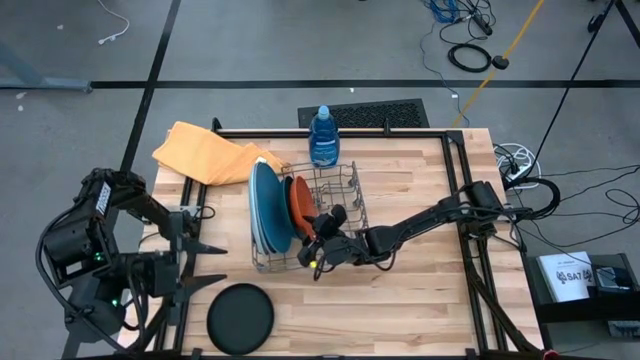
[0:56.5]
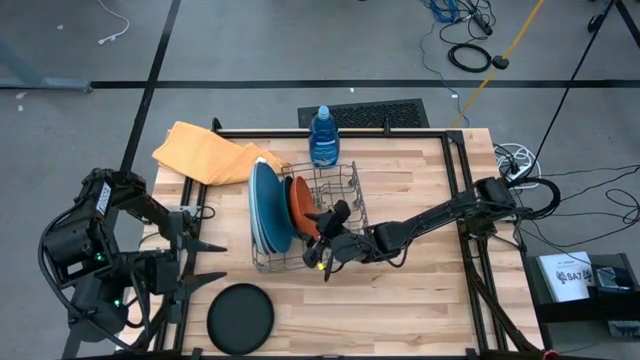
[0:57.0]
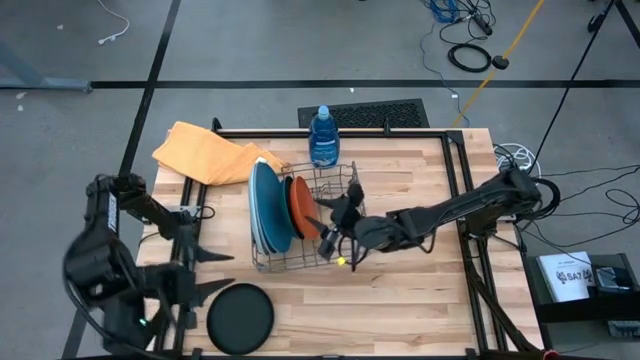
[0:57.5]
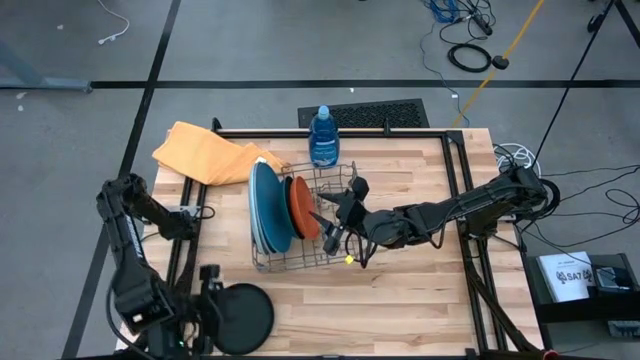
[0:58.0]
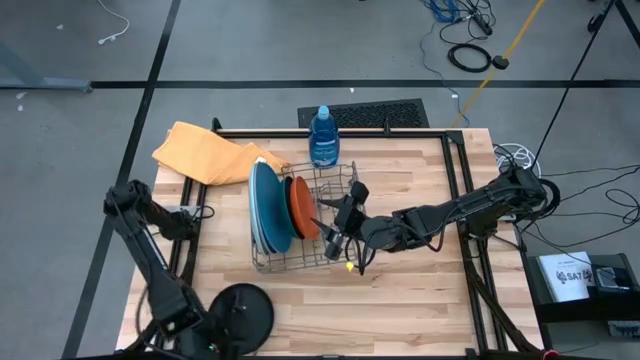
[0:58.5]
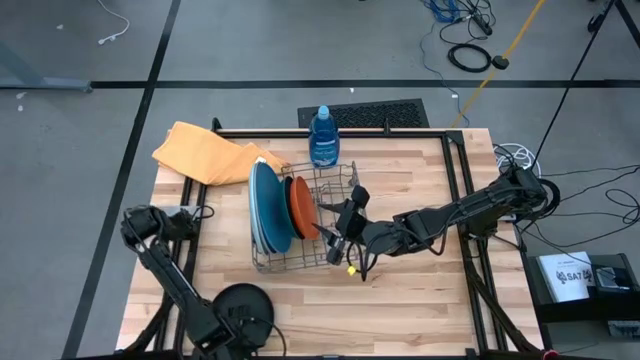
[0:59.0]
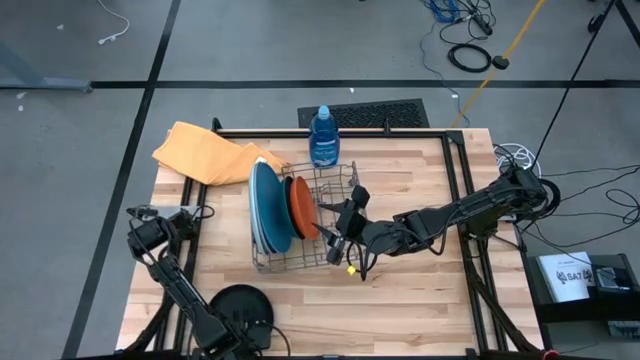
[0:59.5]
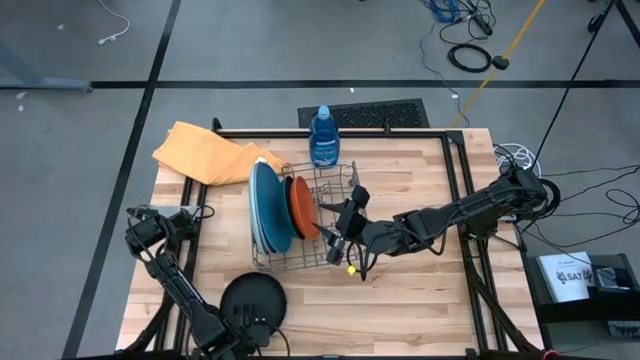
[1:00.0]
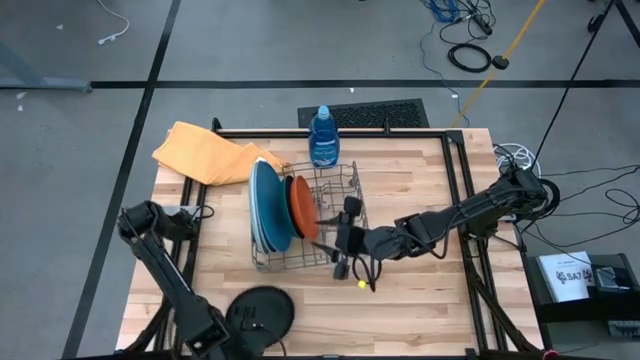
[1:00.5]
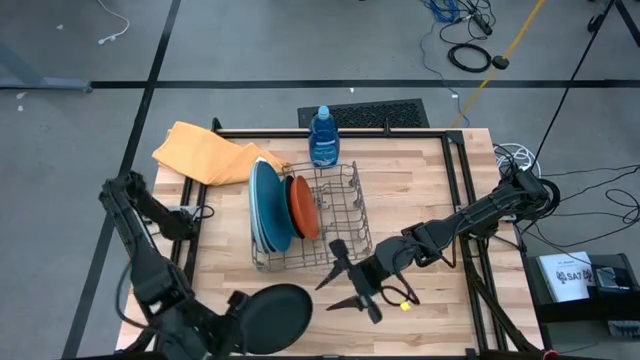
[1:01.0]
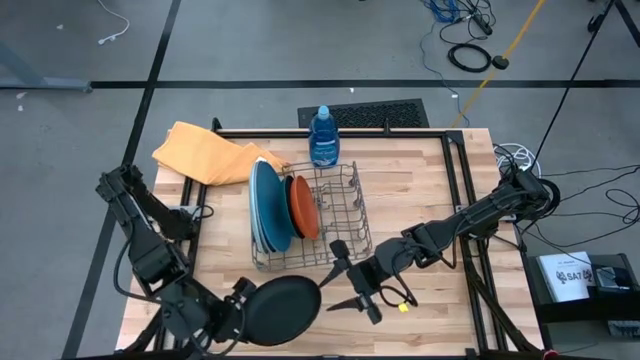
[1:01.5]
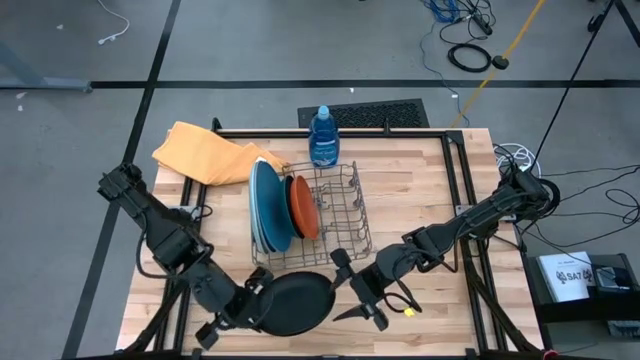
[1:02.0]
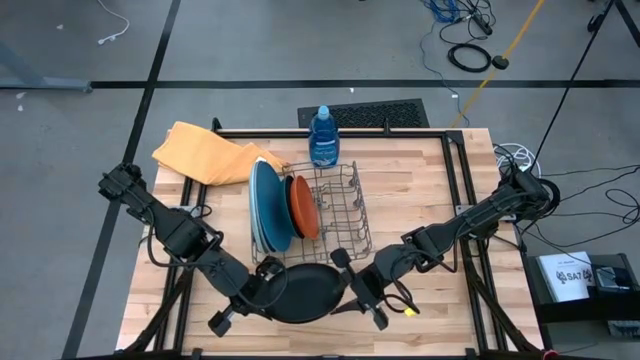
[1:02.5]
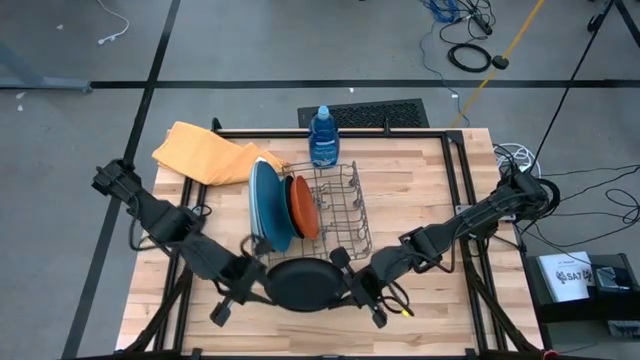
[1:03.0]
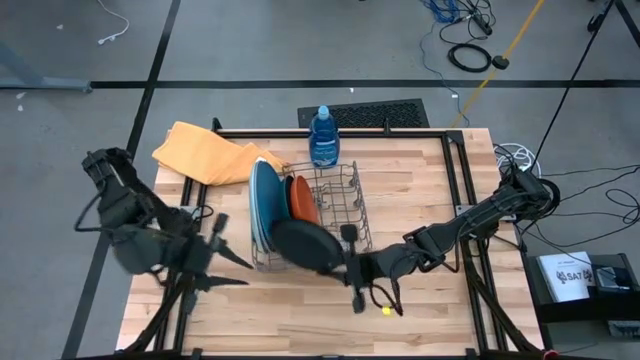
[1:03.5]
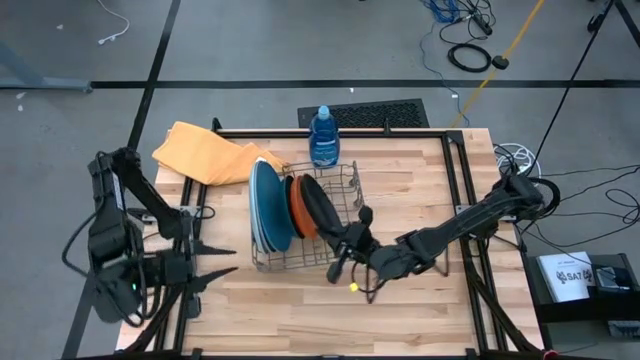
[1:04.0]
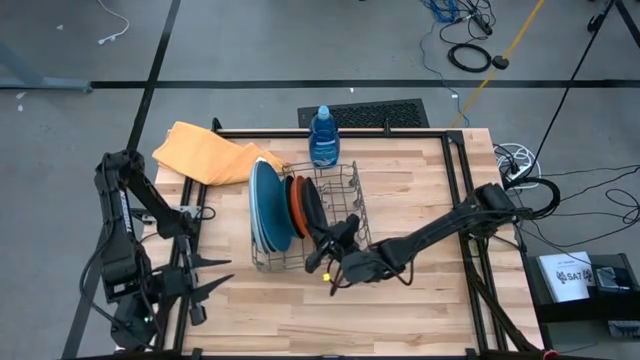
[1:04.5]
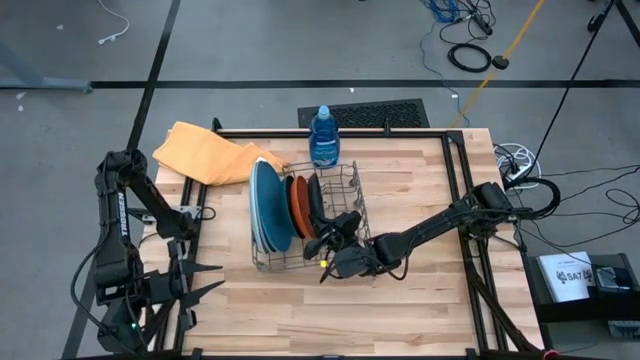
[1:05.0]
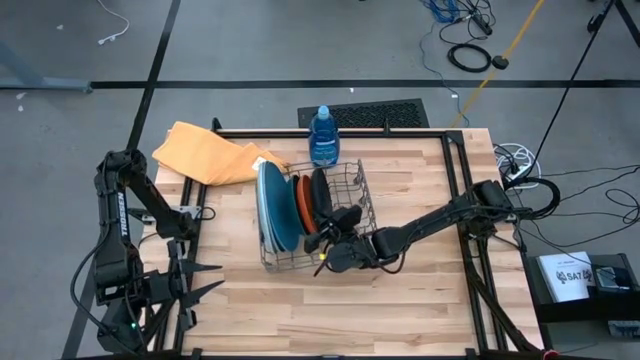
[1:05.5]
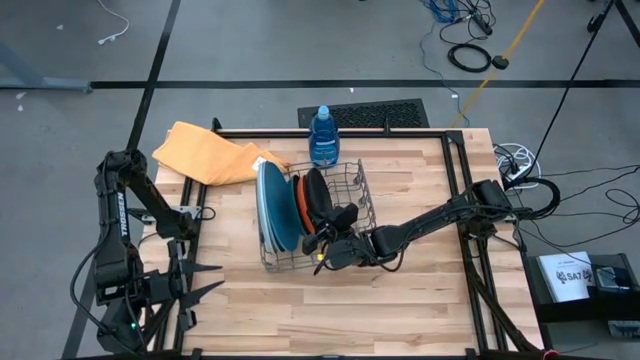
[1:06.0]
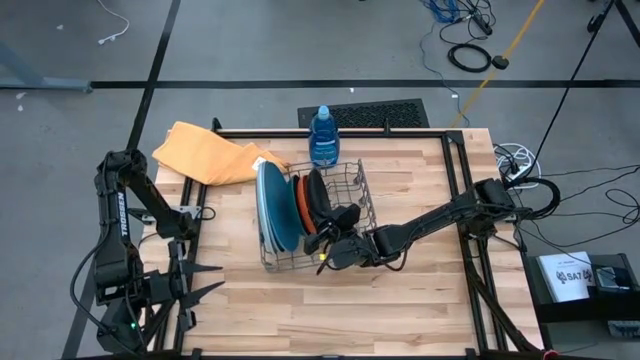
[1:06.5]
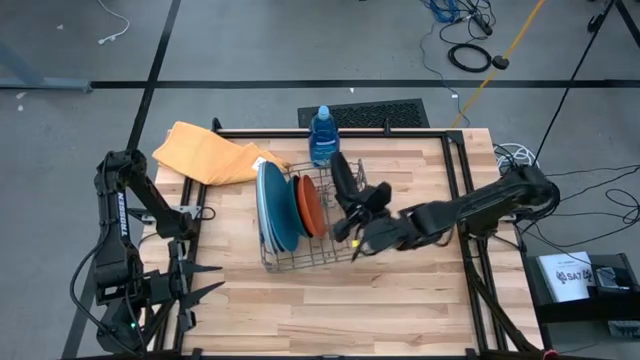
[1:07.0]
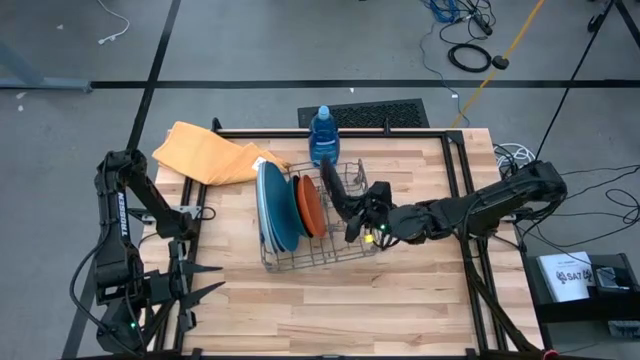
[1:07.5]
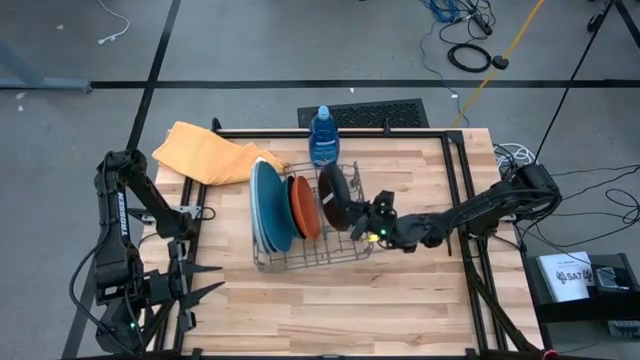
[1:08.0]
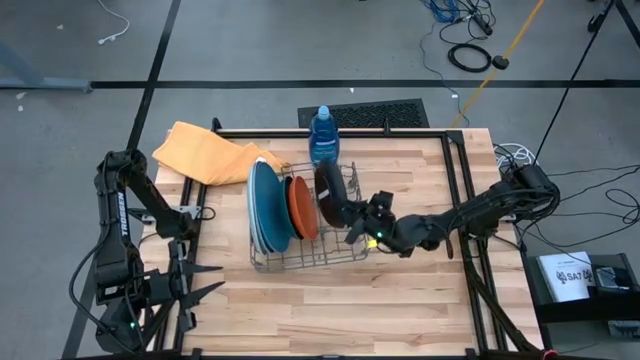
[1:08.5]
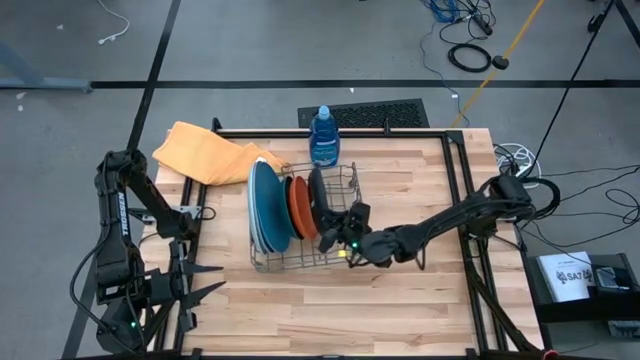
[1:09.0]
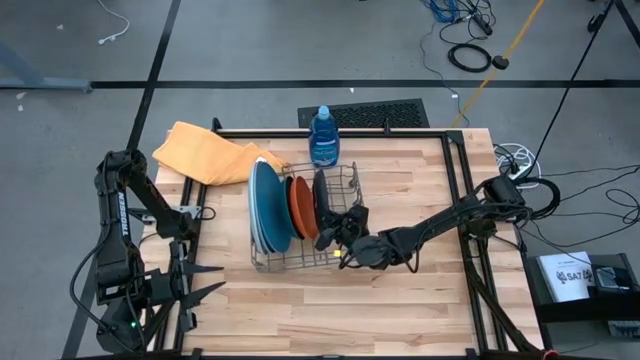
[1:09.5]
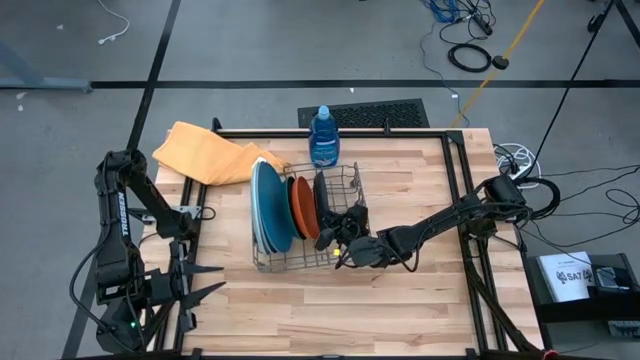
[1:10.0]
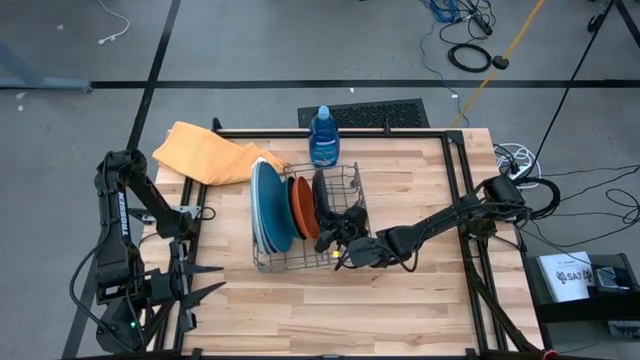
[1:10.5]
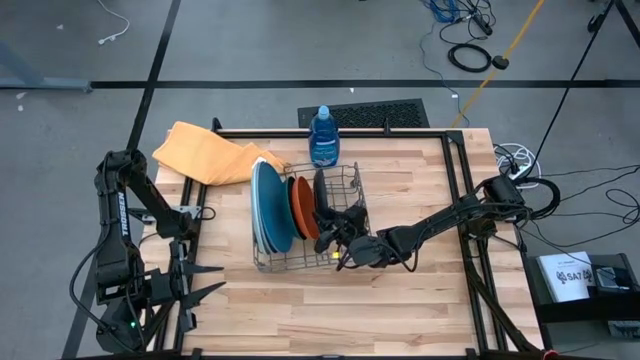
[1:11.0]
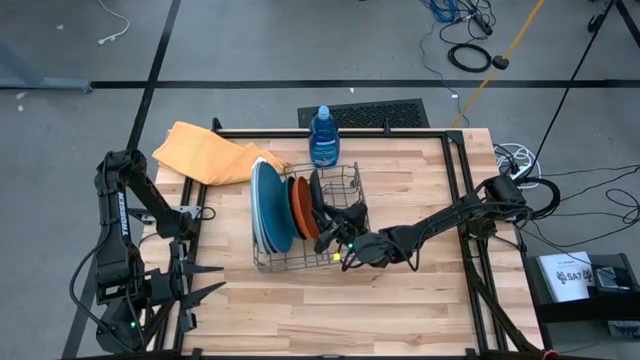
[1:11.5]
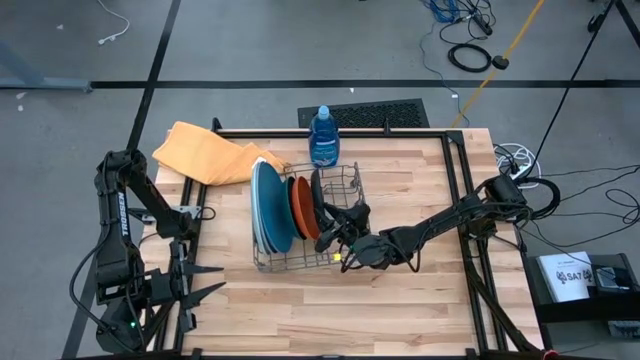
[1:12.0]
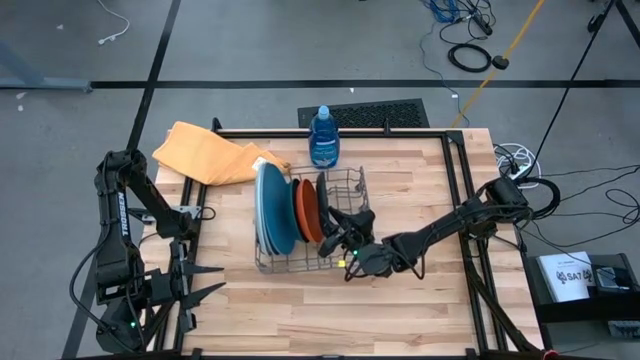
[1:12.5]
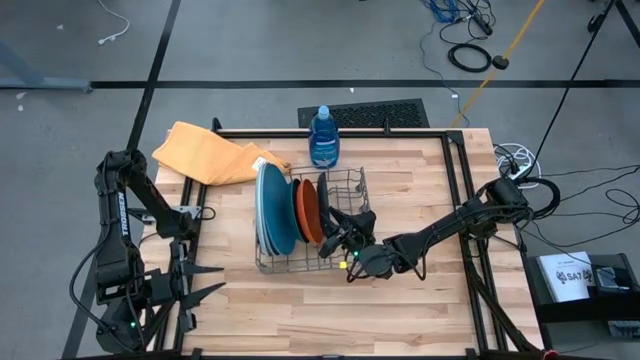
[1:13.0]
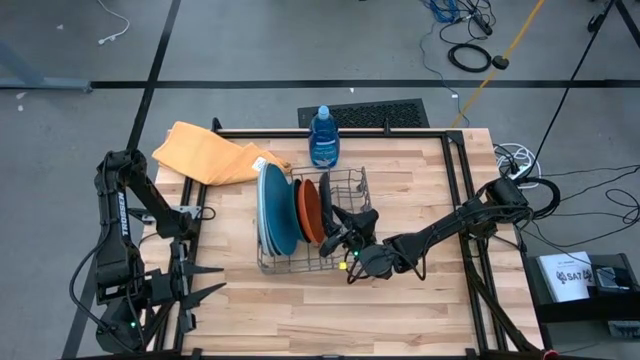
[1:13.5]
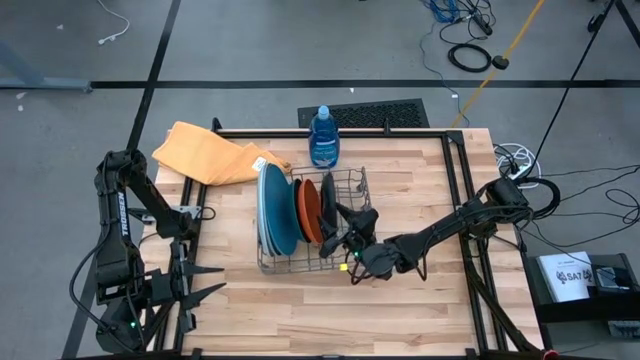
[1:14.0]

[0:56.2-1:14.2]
Task: Sort dishes
Put the black plate in the dish rack

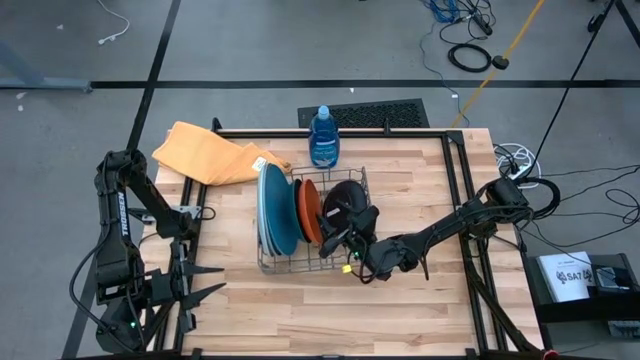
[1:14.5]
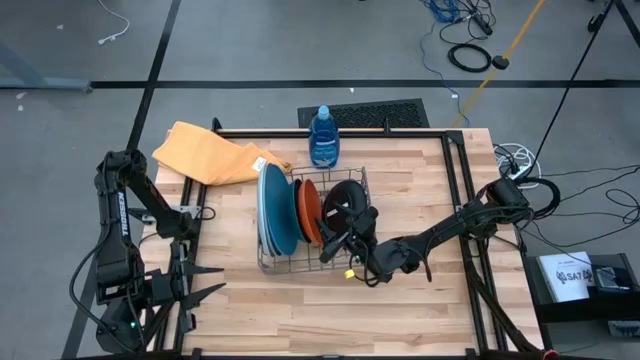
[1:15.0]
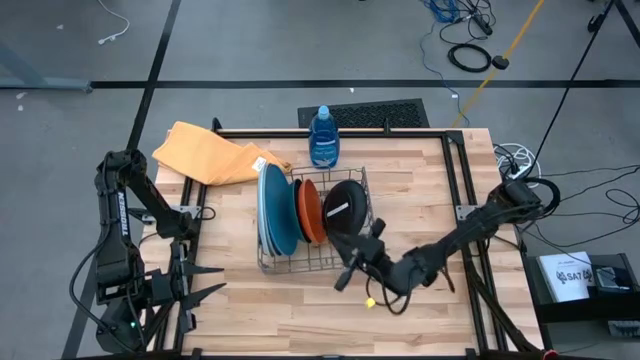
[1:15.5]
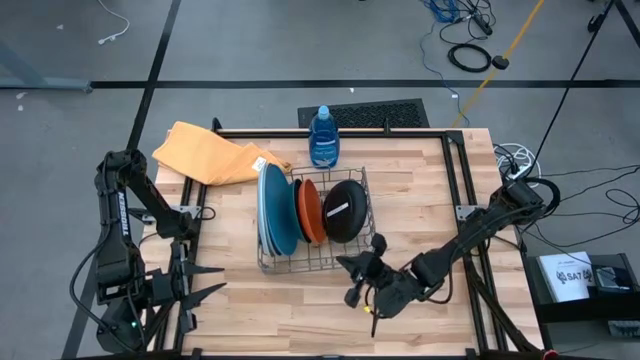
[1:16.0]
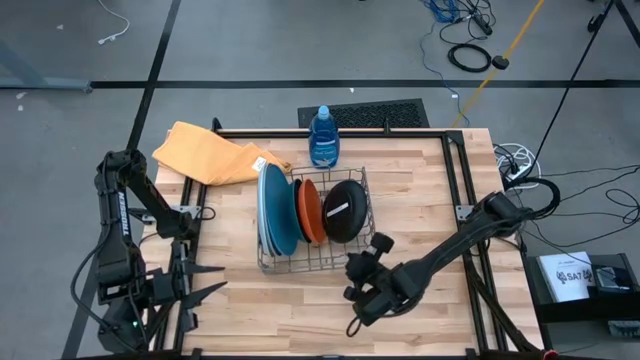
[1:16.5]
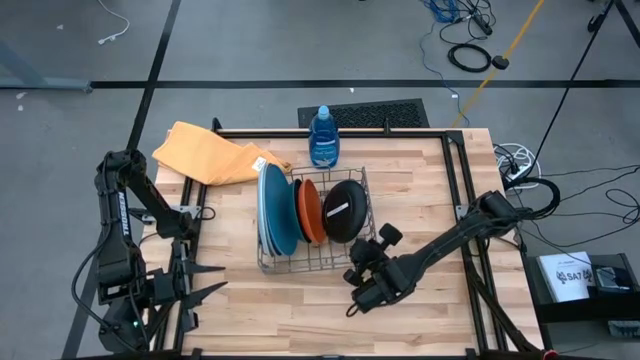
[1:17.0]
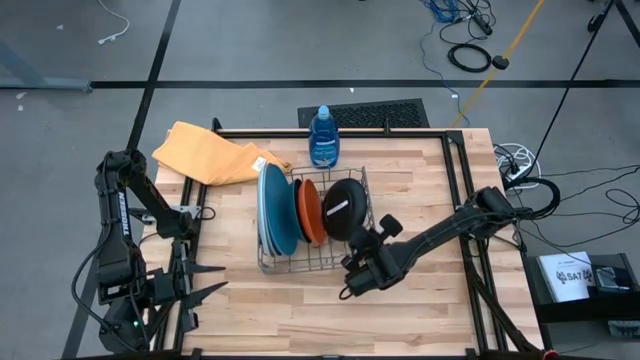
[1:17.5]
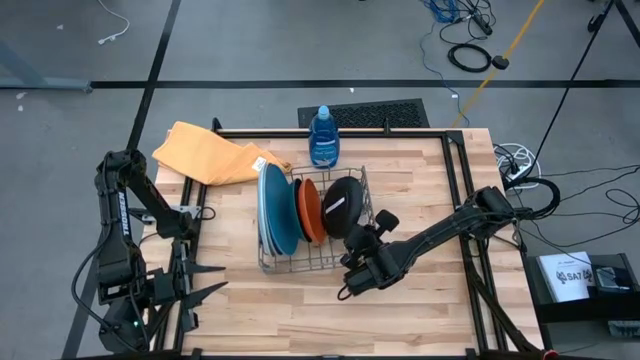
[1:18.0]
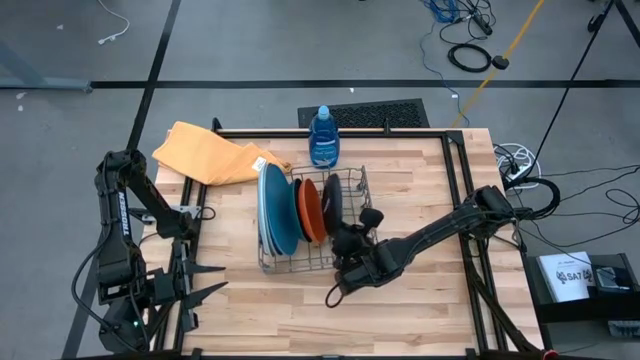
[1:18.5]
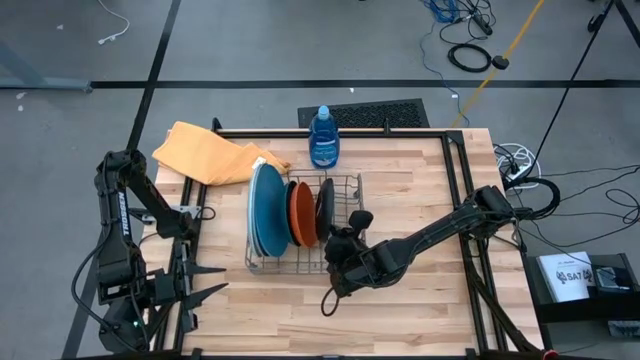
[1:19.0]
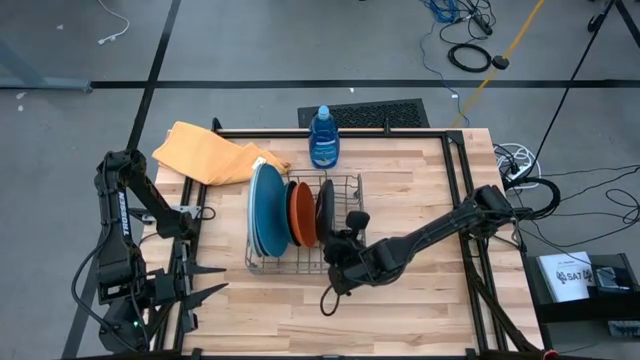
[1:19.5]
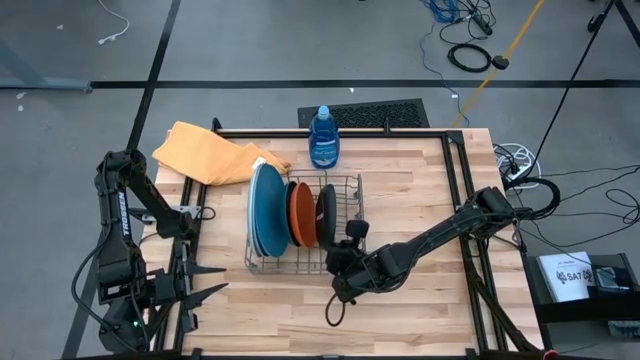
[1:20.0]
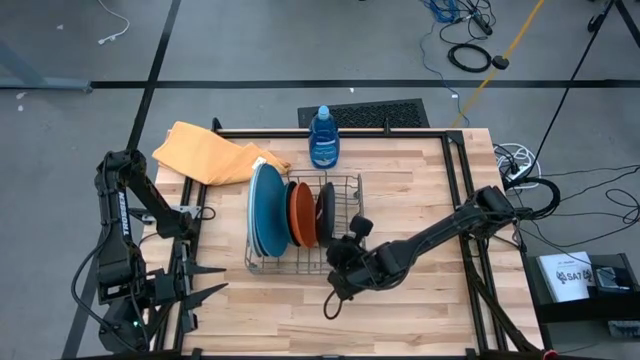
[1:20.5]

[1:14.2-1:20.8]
Adjust the black plate in the dish rack
